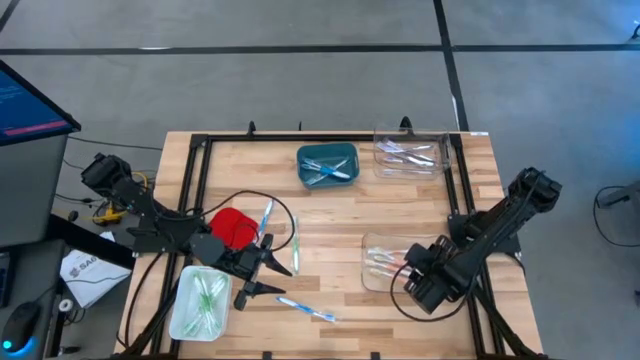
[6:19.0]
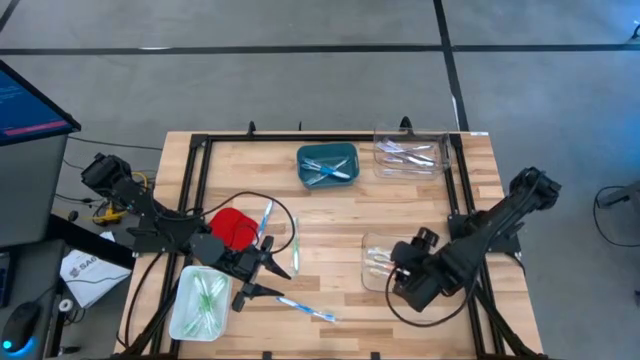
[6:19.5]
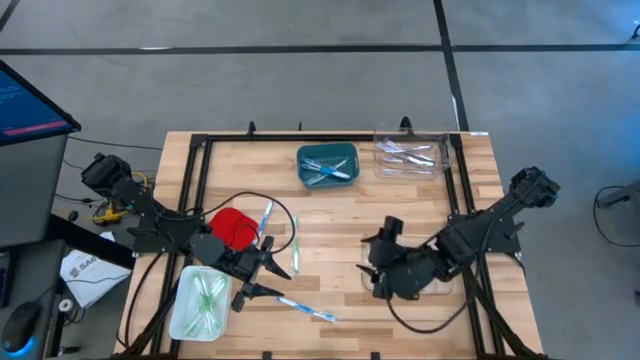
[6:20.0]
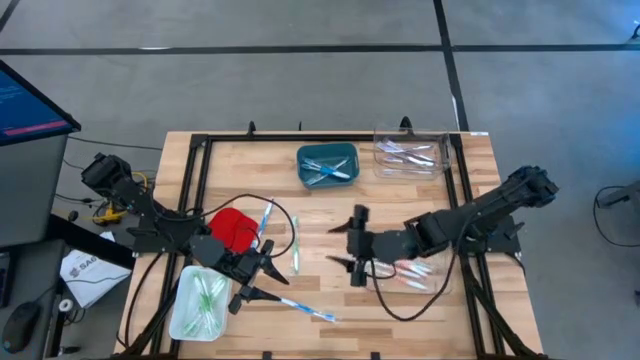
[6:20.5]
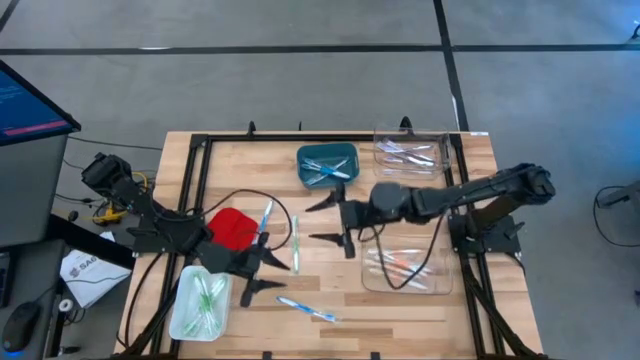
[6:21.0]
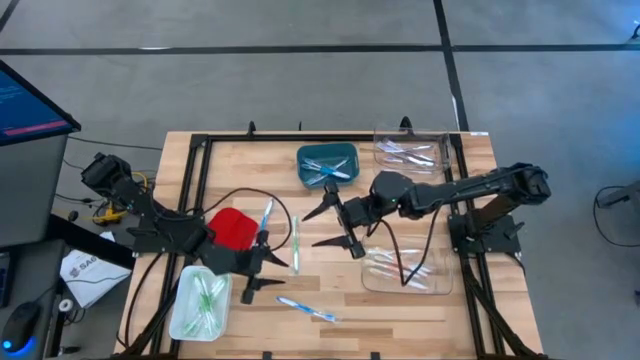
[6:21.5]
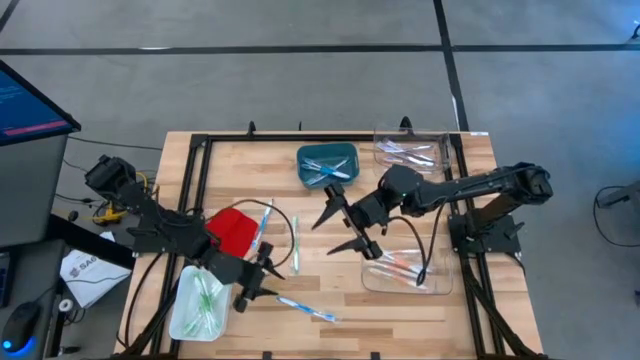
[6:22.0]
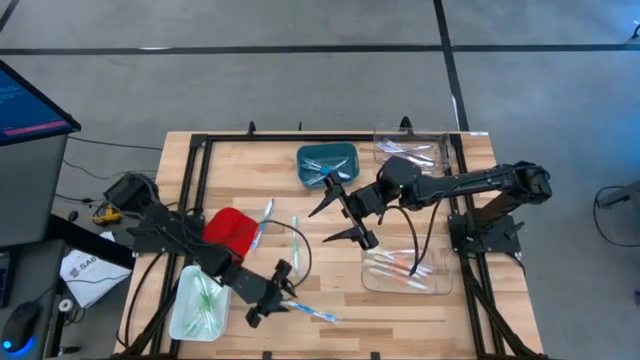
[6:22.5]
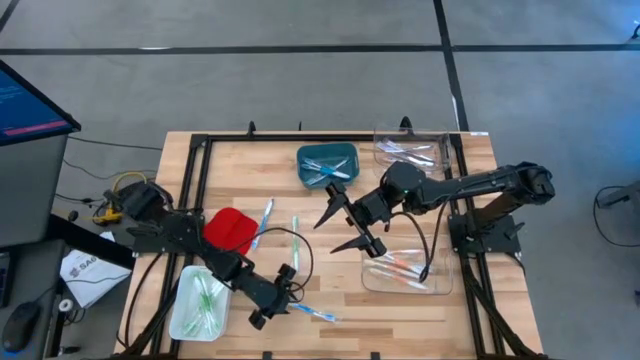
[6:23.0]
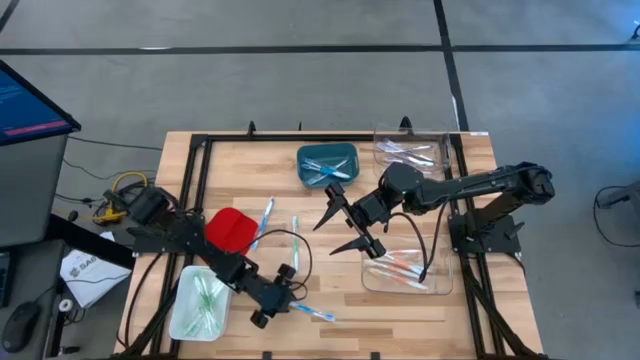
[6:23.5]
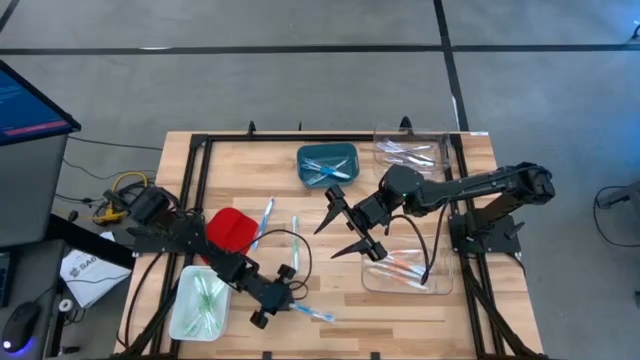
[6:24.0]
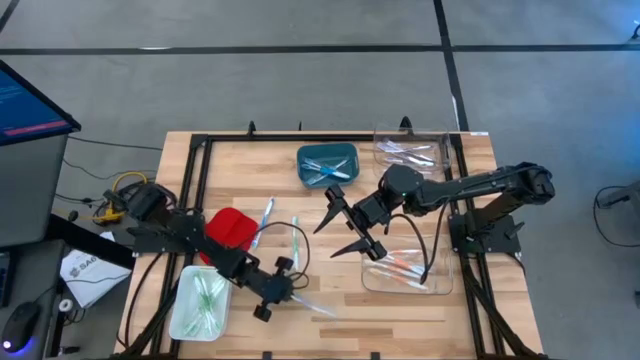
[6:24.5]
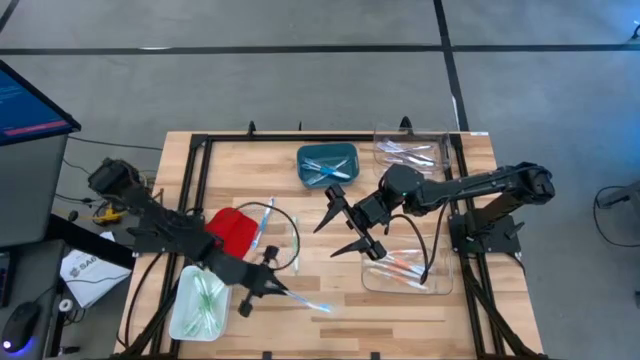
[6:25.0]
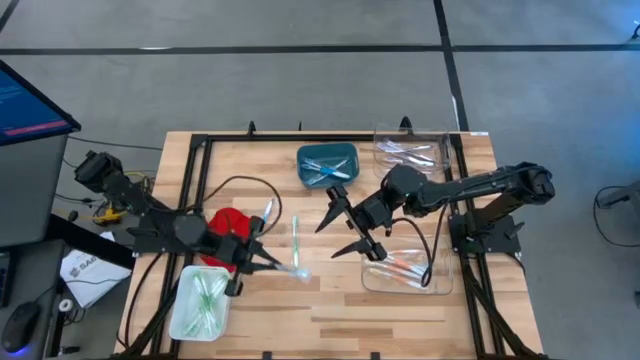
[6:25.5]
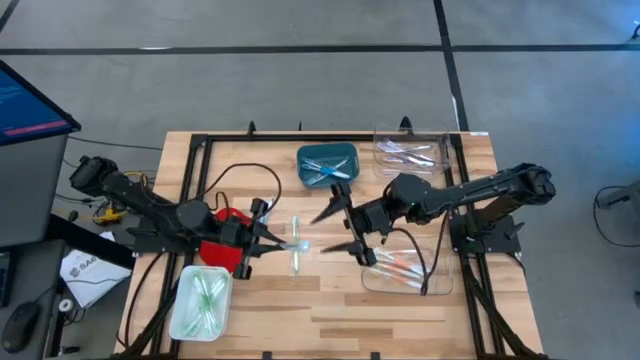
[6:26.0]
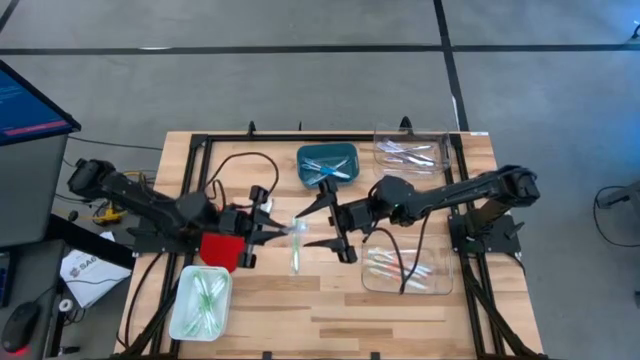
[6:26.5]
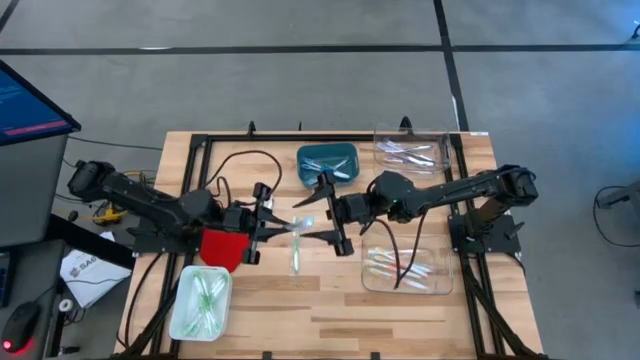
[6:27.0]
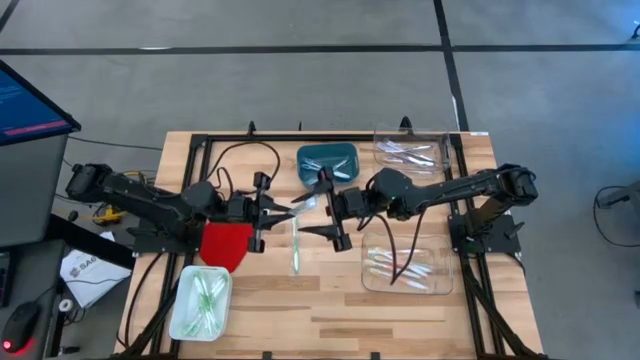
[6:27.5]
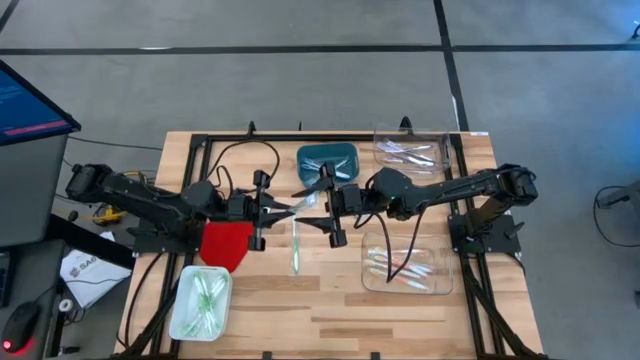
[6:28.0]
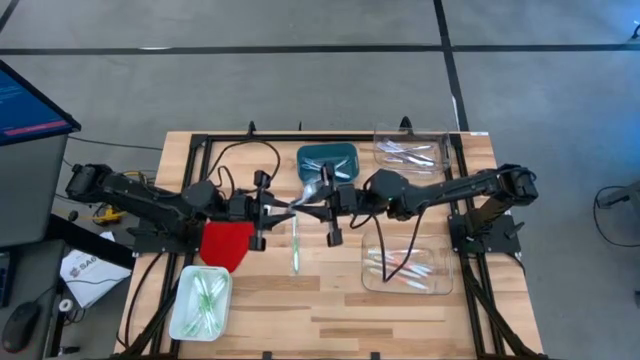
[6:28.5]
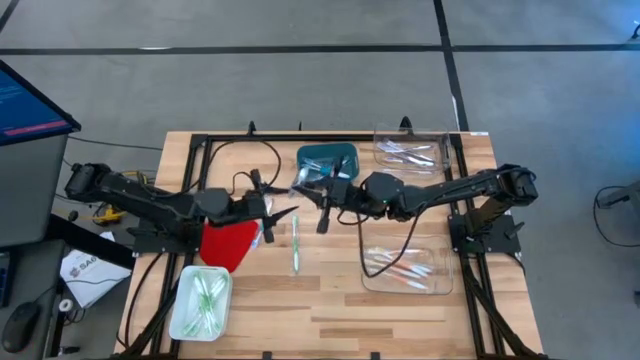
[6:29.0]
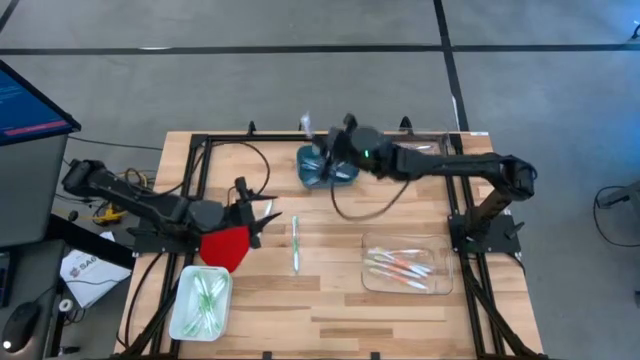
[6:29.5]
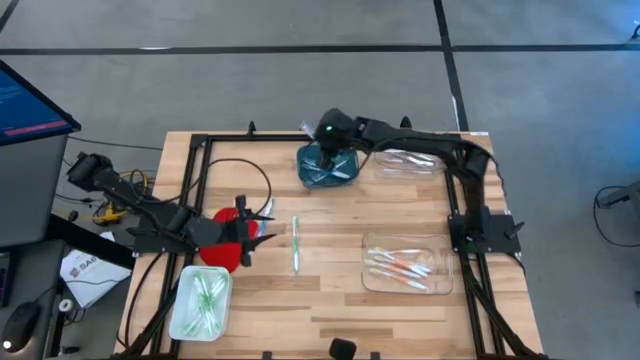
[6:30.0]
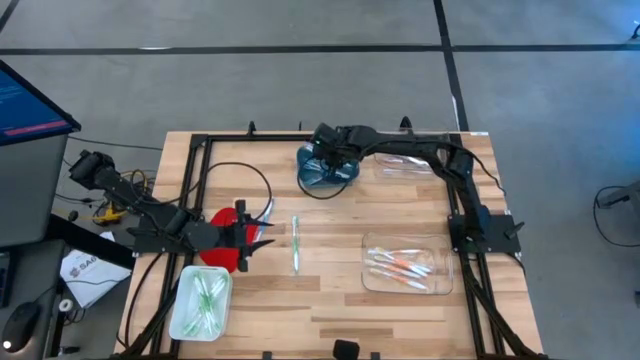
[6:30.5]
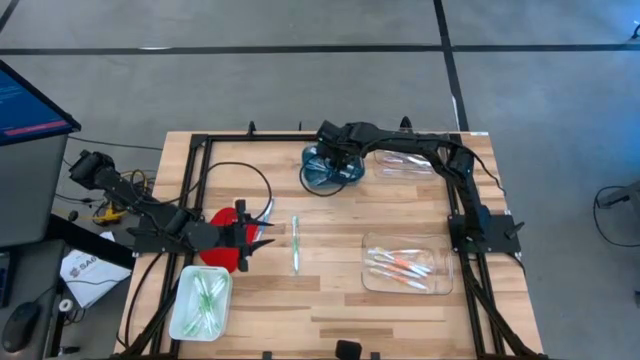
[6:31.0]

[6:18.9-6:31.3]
Task: Pick & Place Toothbrushes
Put the blue toothbrush into the blue bin

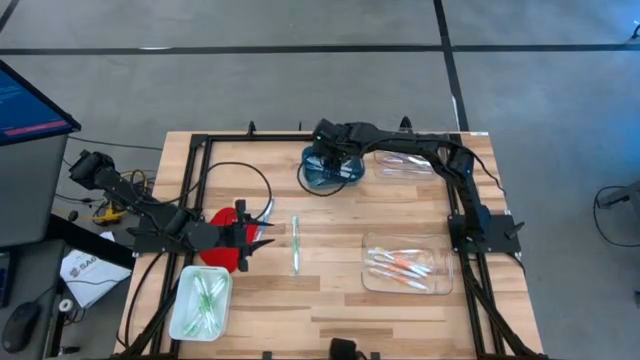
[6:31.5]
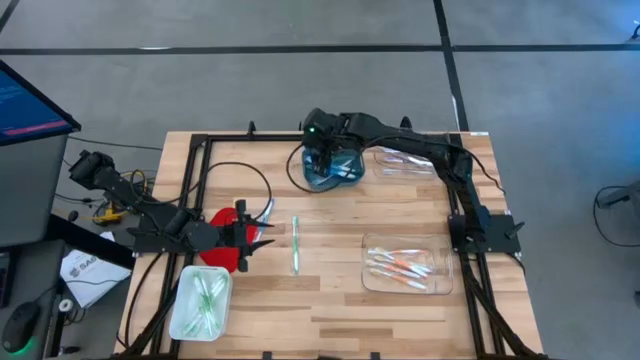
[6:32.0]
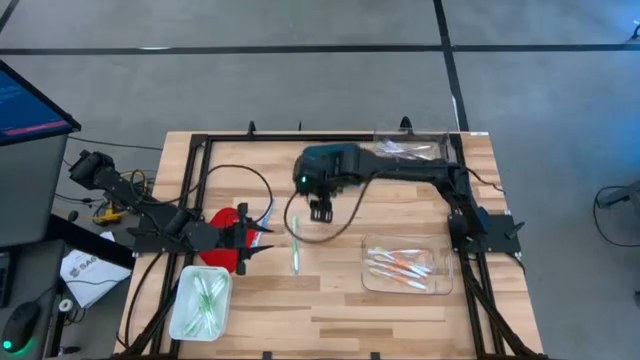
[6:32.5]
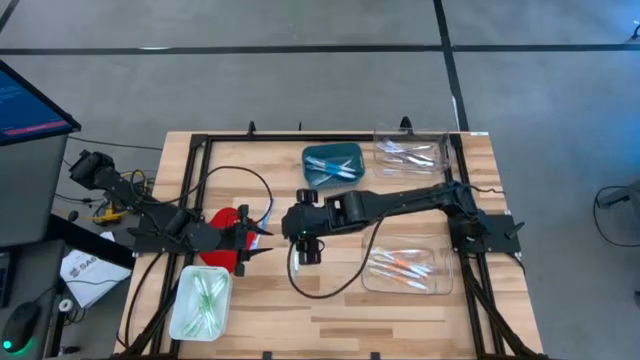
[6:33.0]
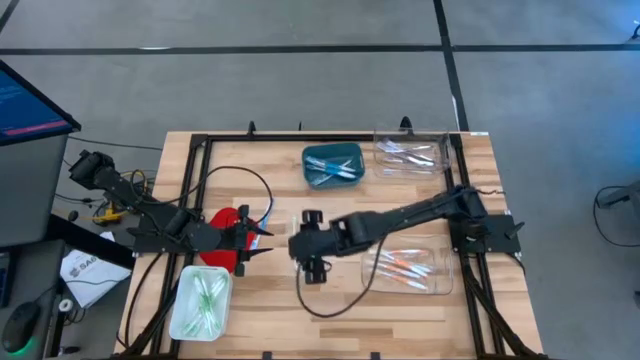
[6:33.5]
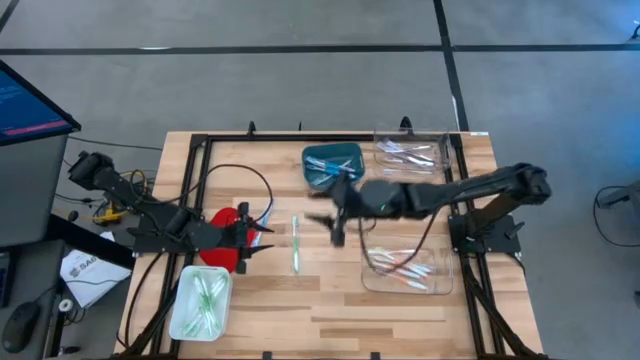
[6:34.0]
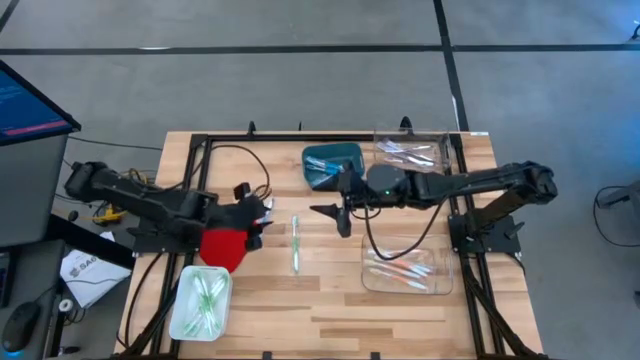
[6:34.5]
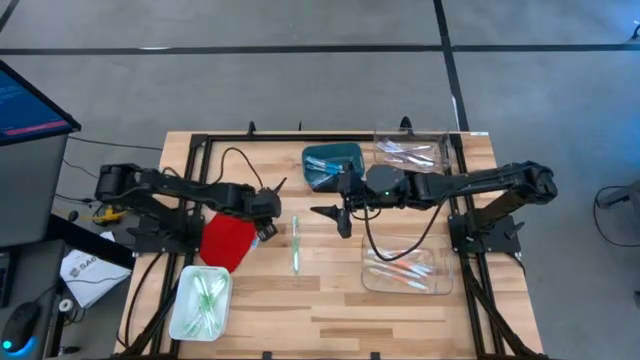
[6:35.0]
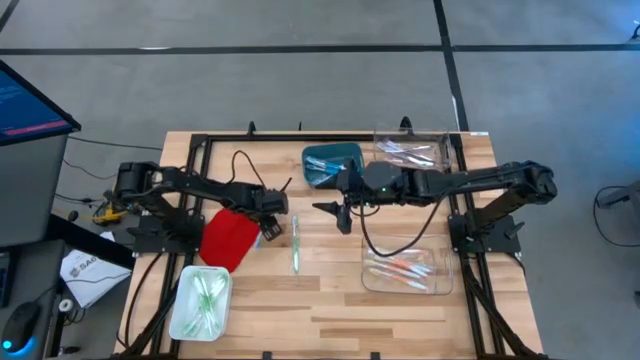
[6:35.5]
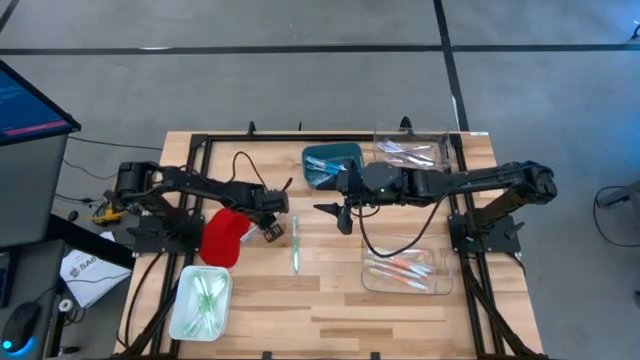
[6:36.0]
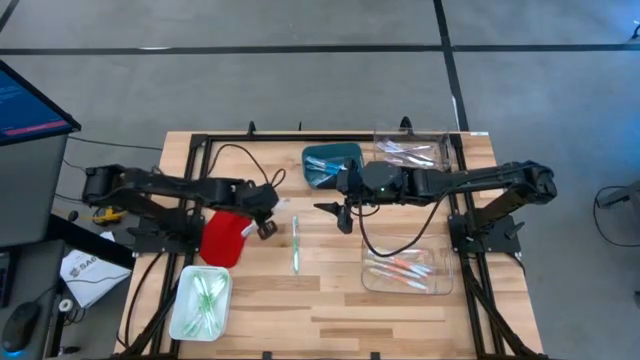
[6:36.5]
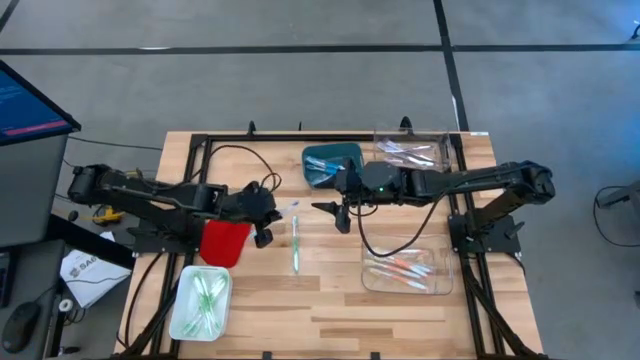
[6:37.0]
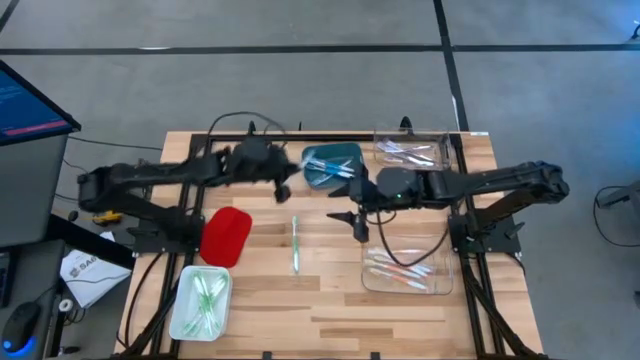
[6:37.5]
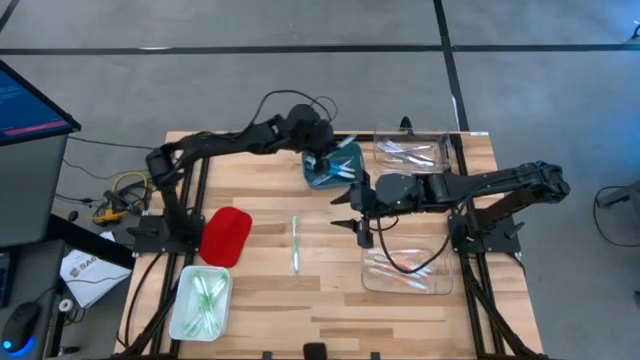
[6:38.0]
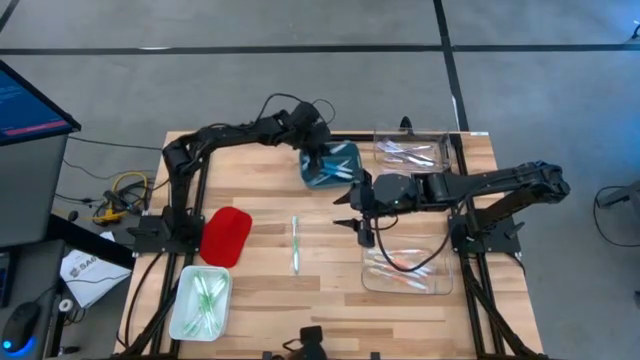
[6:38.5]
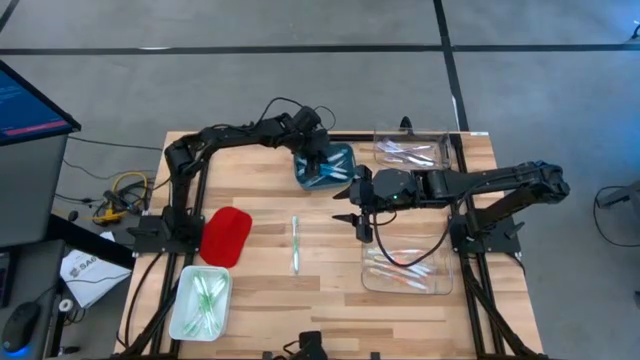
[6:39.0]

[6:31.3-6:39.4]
Put the blue toothbrush into the blue bin

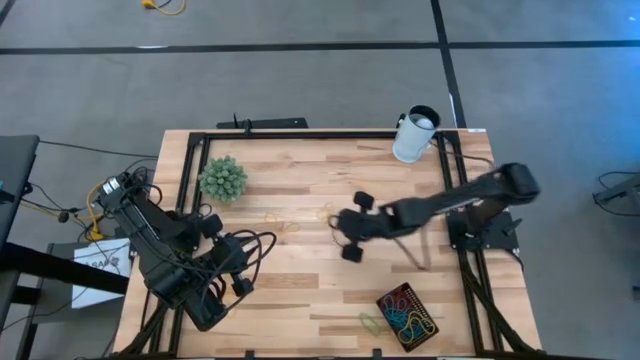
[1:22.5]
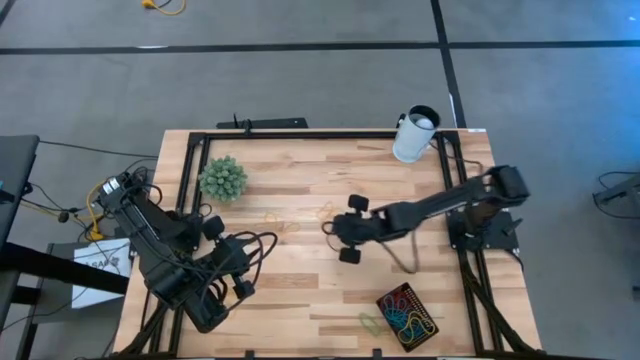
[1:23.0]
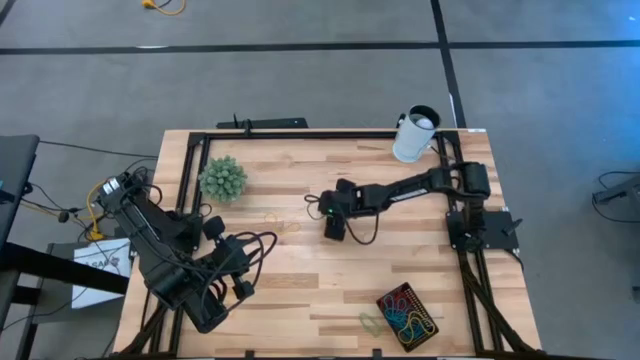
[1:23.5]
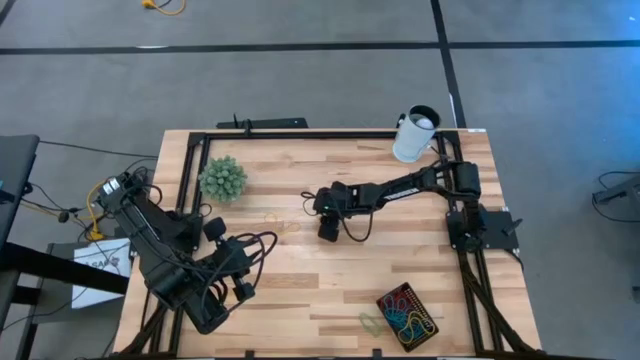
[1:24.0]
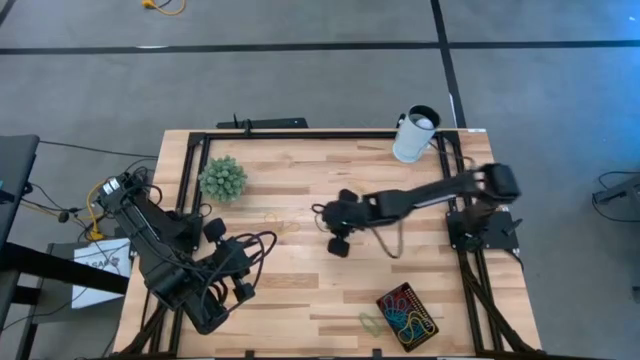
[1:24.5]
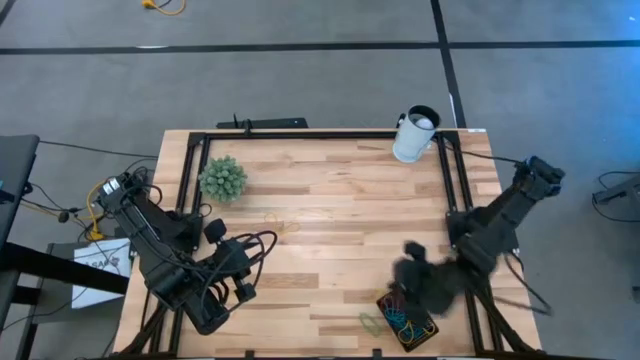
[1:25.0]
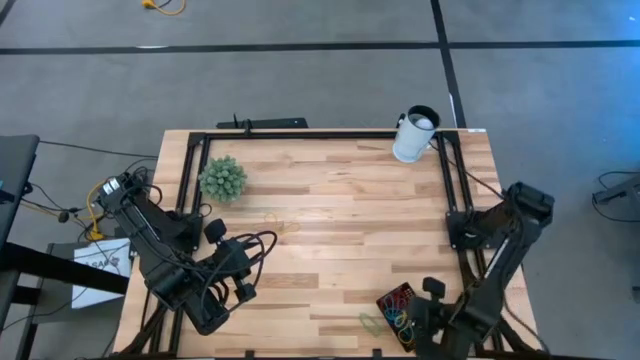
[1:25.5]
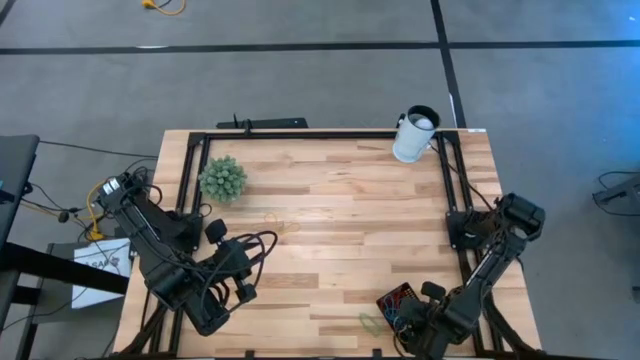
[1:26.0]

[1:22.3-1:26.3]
Task: Pick and place rubber bands into bin
Put the yellow rubber band into the black basket
